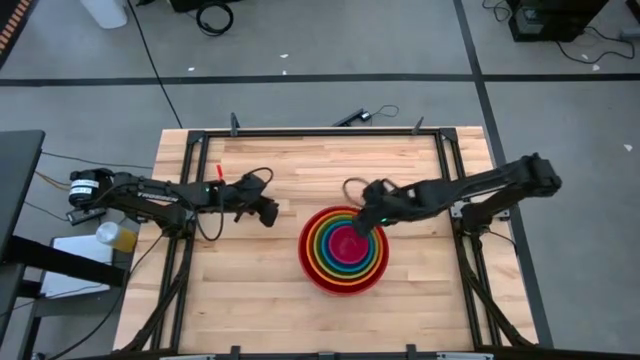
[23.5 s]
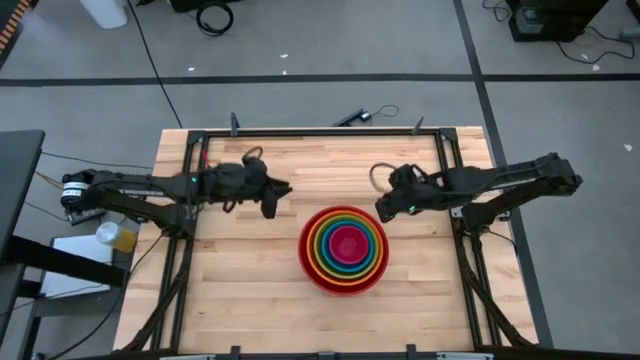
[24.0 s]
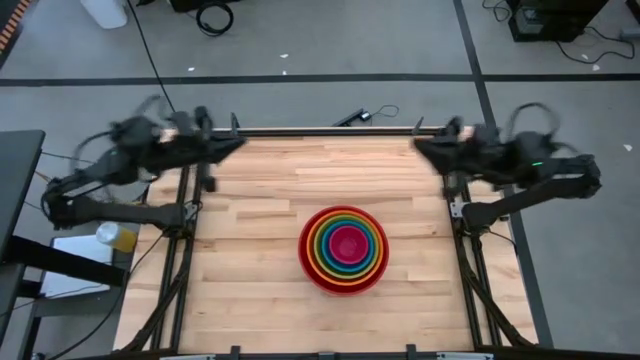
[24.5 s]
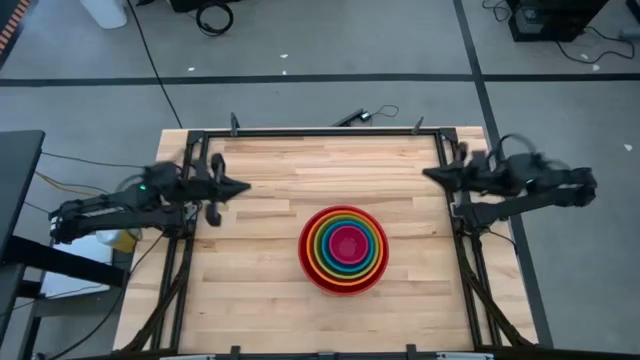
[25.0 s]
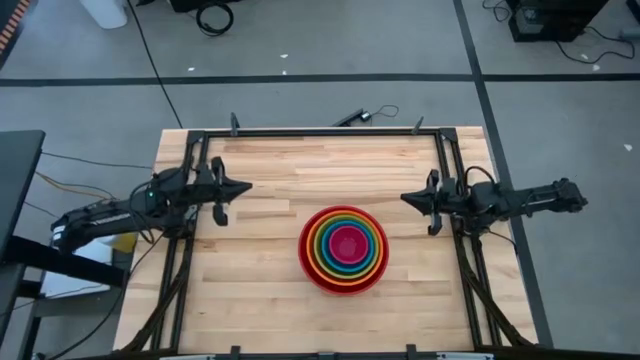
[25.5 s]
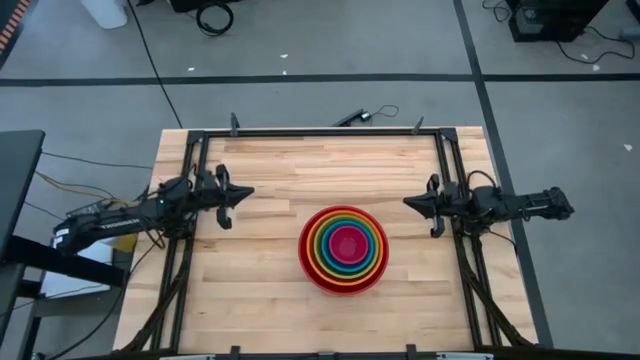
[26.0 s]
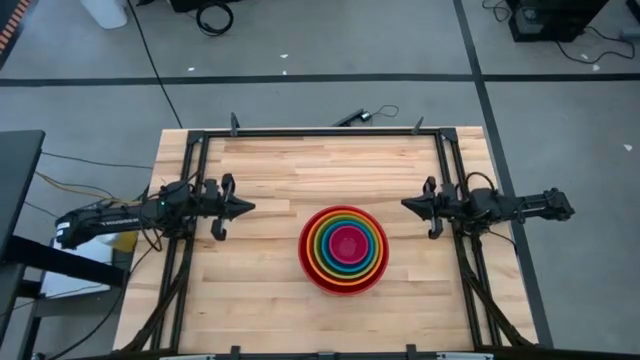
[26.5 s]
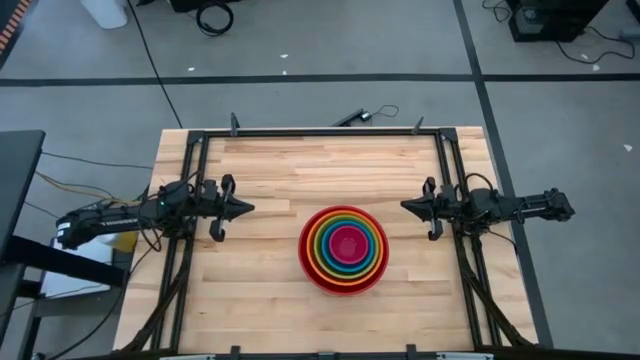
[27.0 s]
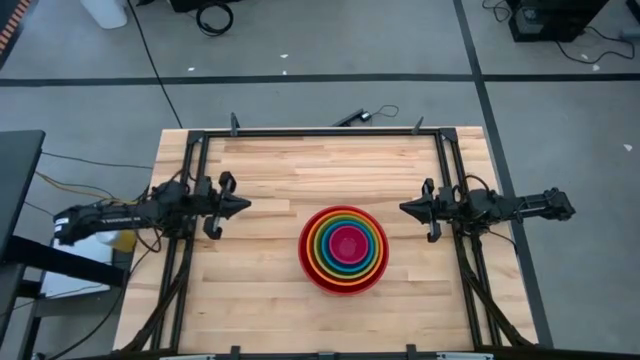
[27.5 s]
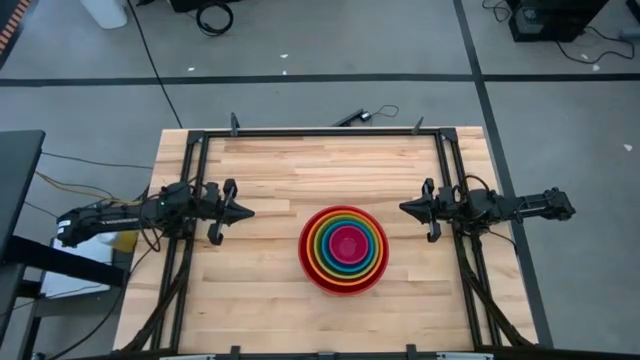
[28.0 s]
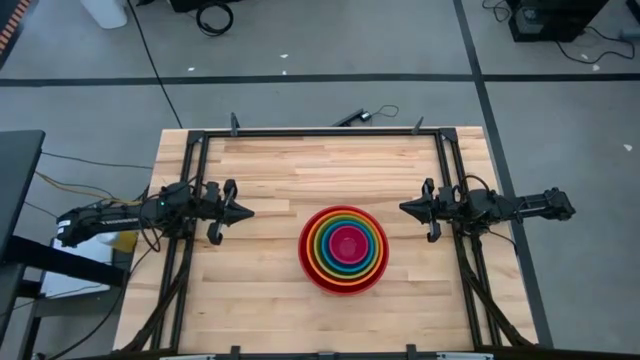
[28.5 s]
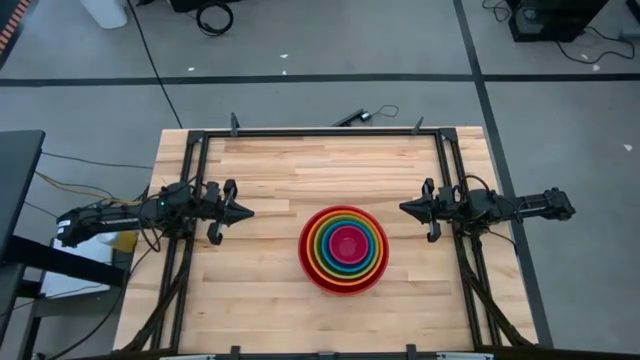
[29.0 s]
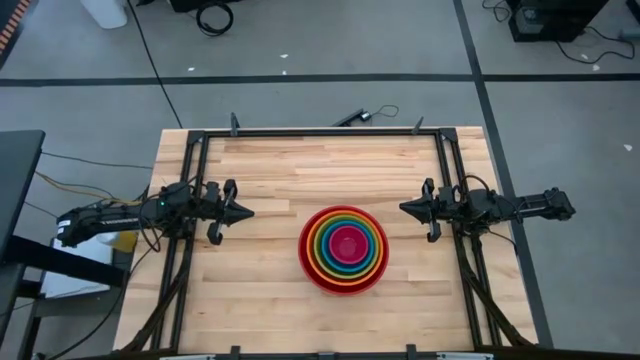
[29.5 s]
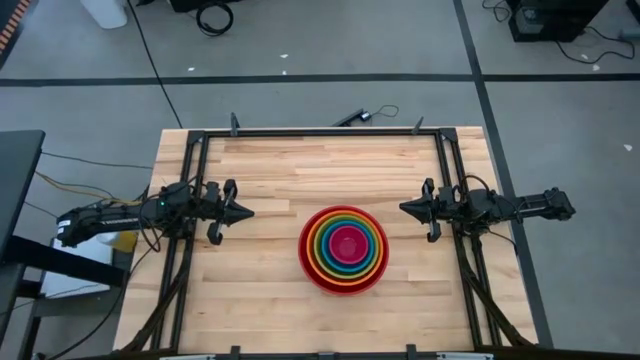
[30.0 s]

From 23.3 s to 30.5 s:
Return to Home Position

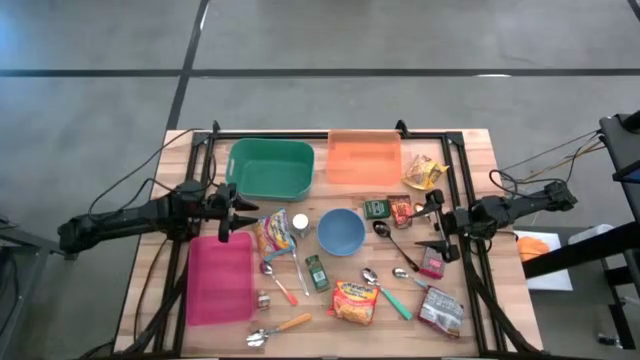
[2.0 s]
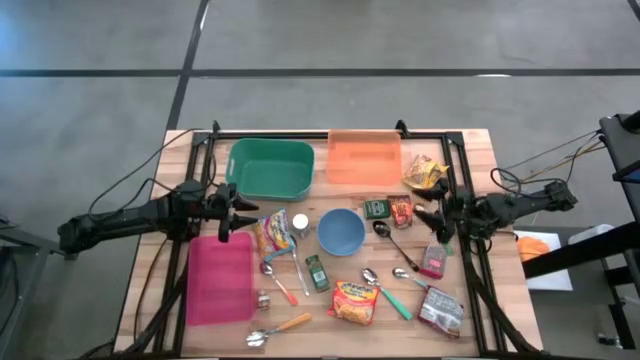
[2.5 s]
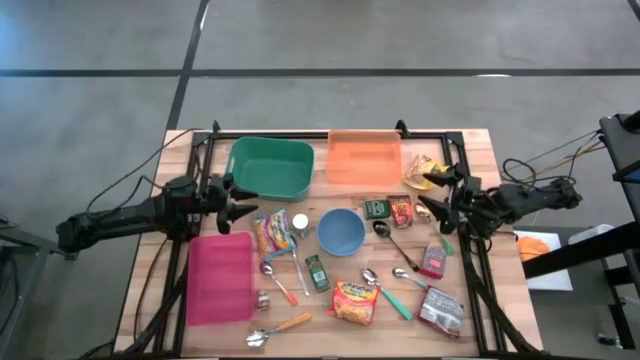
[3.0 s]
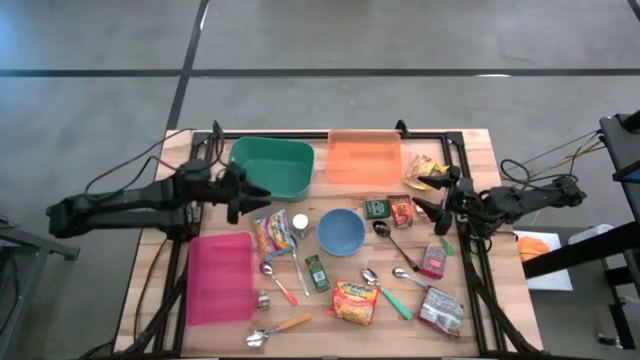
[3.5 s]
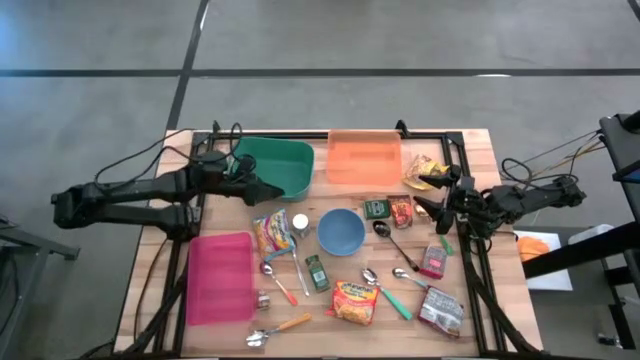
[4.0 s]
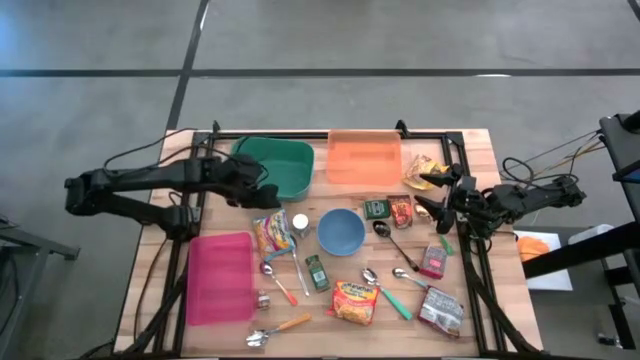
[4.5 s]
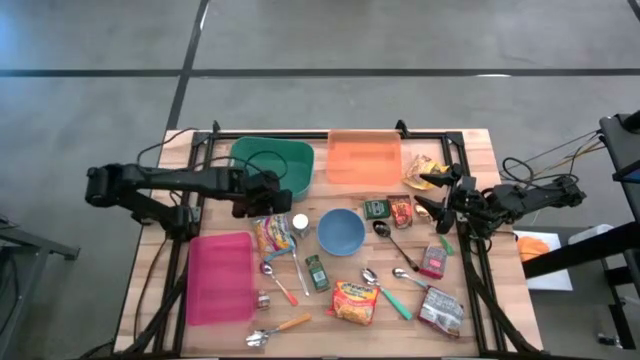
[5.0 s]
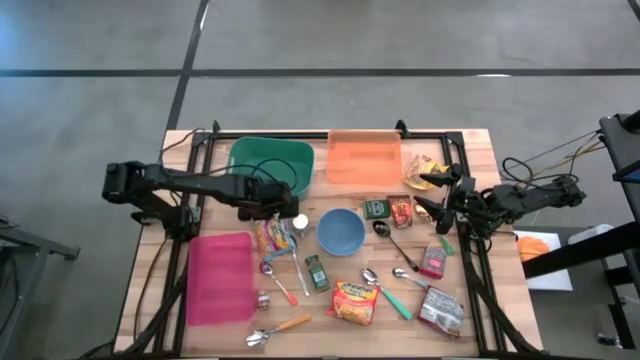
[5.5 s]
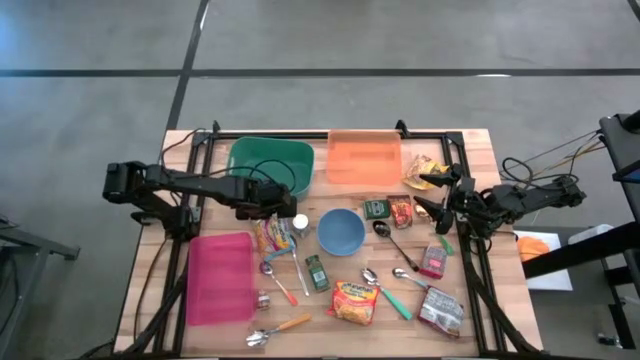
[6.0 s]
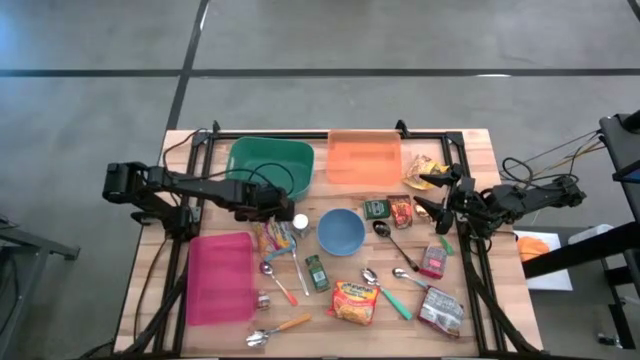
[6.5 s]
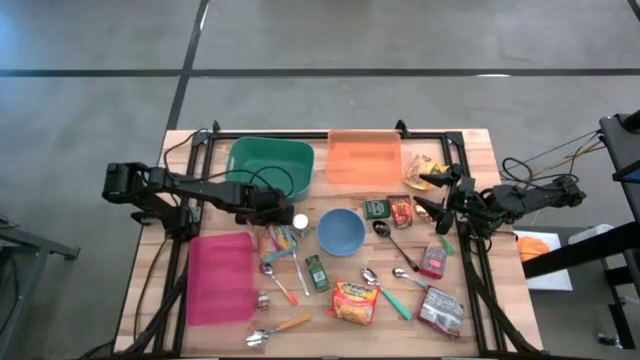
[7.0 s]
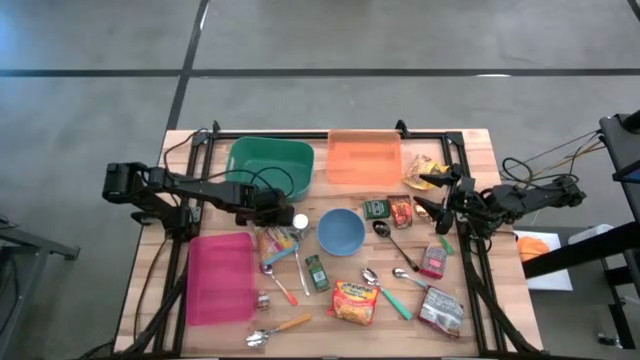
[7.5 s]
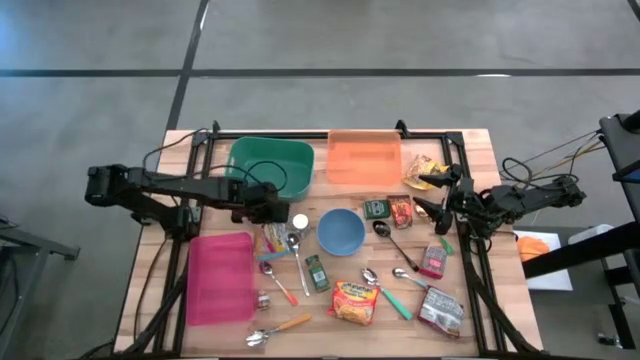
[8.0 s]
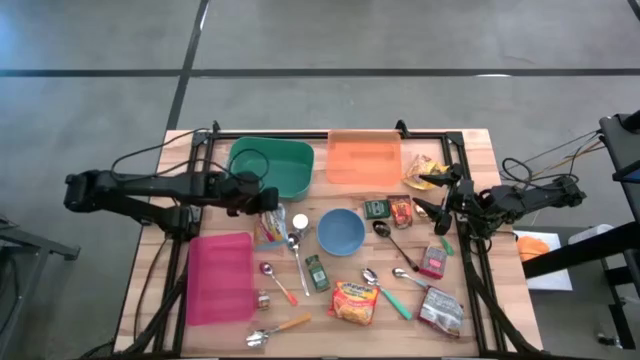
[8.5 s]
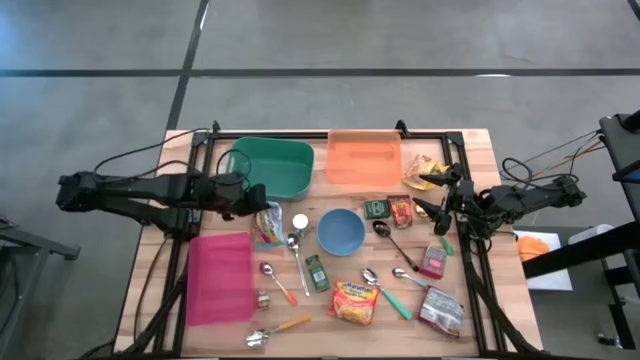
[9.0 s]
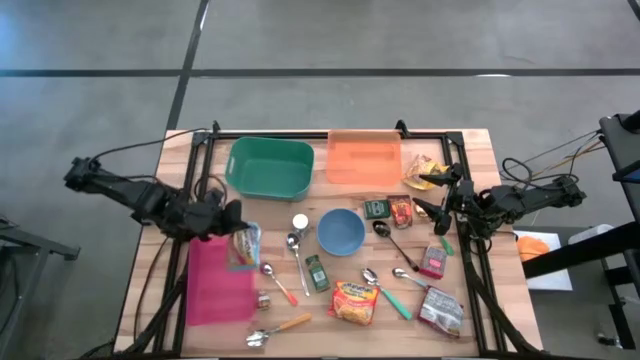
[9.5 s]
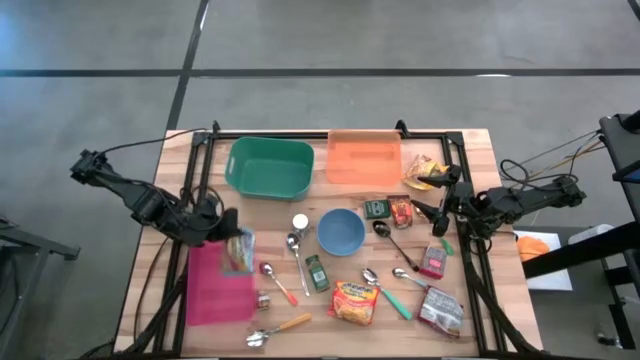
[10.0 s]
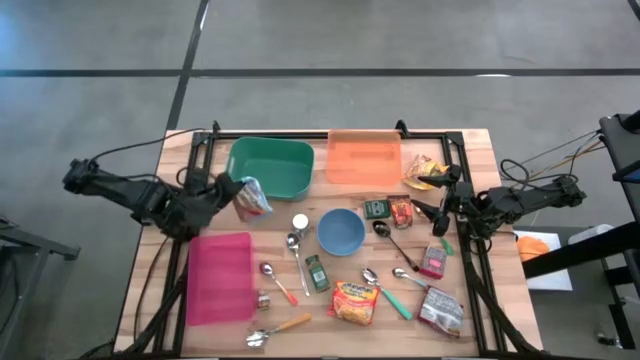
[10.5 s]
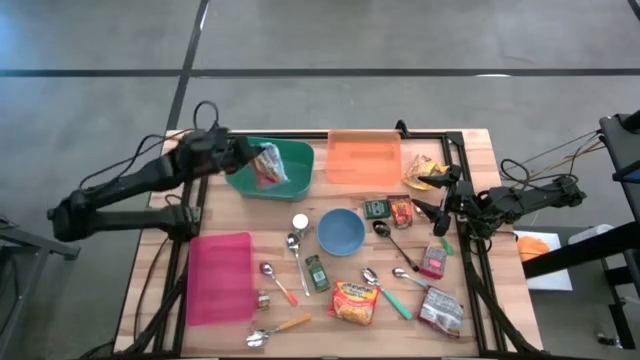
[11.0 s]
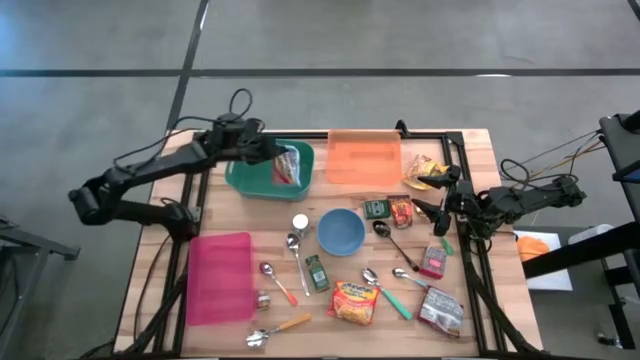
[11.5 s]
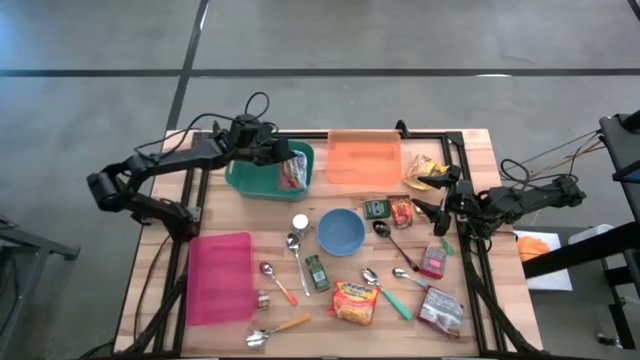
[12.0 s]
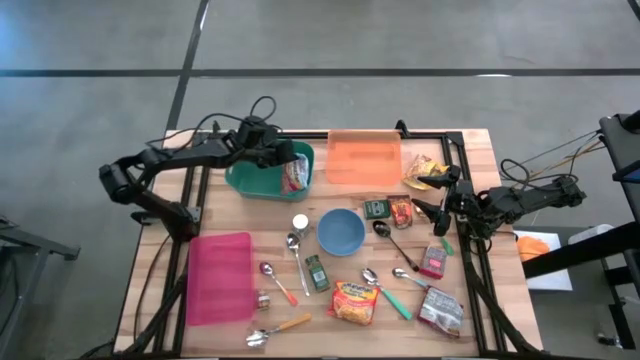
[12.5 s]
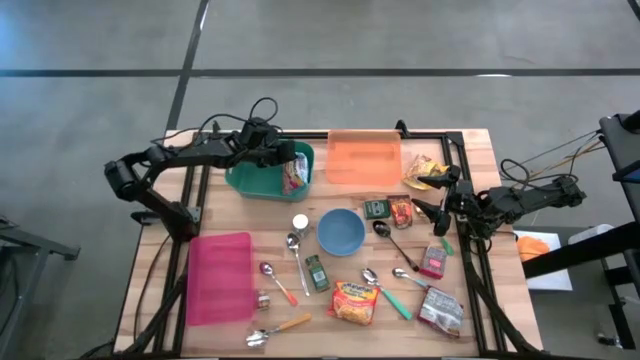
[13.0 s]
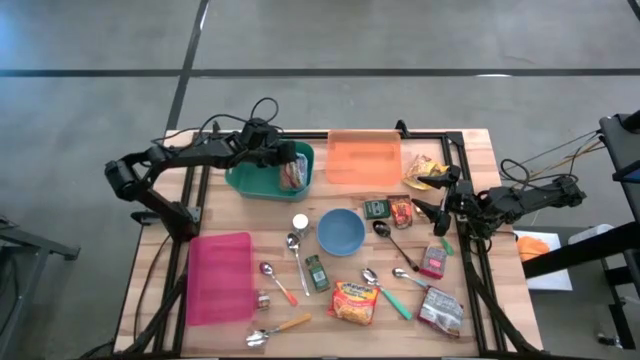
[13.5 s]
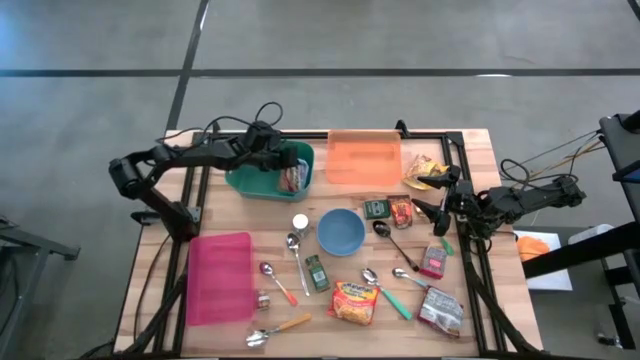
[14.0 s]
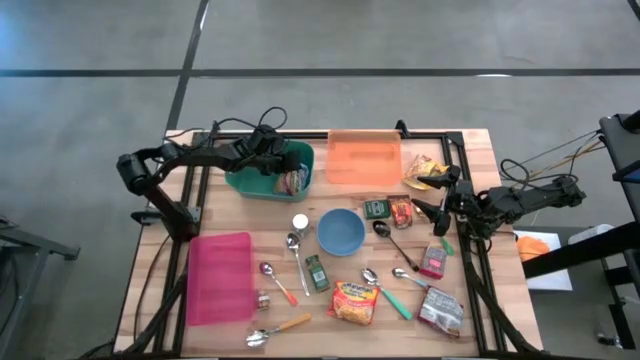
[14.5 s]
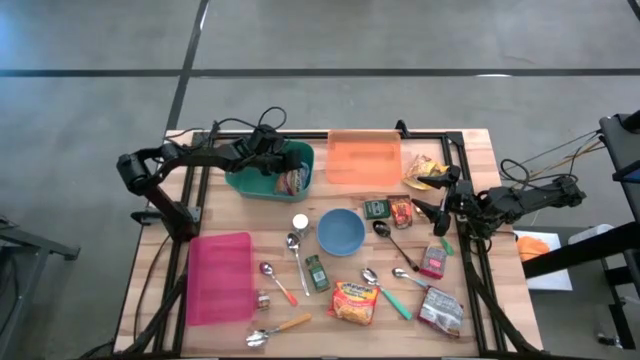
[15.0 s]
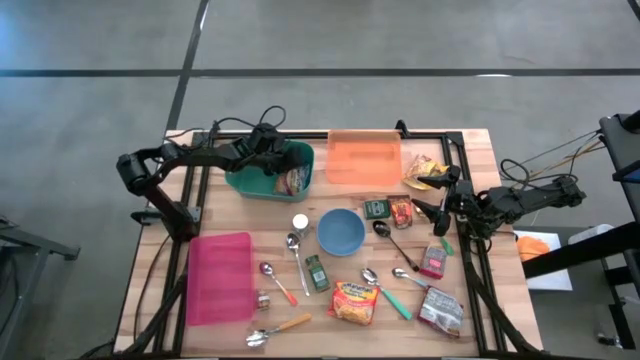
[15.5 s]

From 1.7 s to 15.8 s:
Put the light blue noodle pack into the green bin
